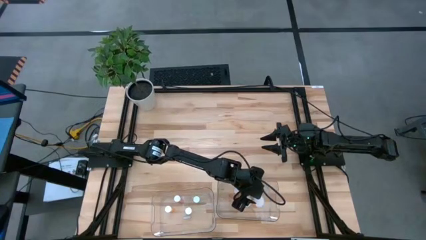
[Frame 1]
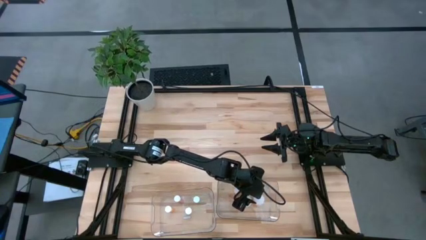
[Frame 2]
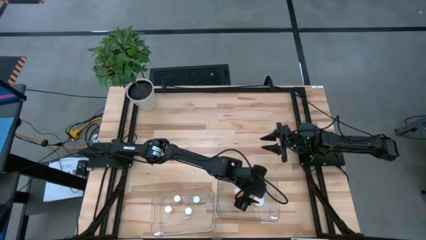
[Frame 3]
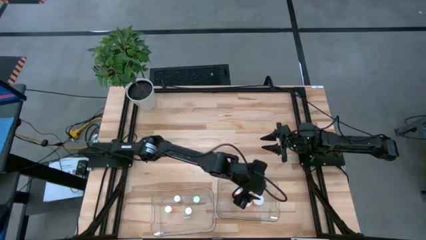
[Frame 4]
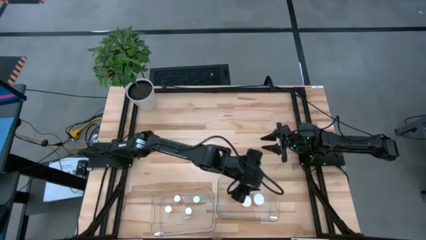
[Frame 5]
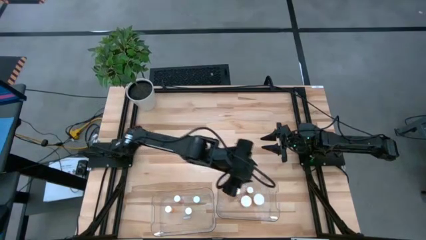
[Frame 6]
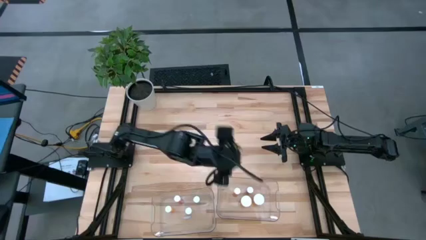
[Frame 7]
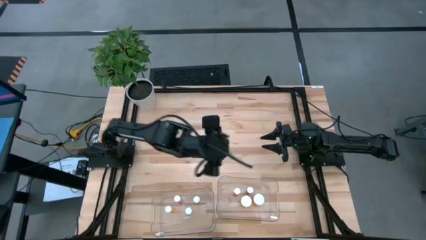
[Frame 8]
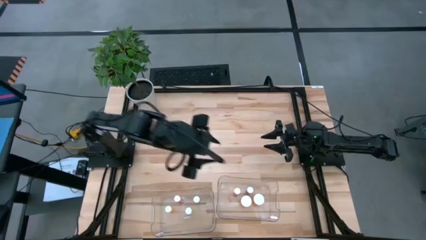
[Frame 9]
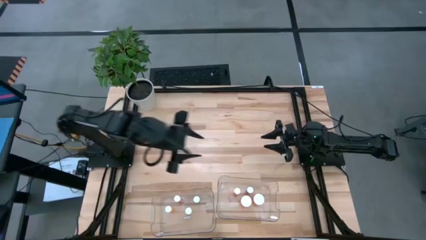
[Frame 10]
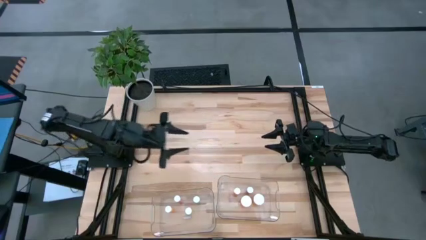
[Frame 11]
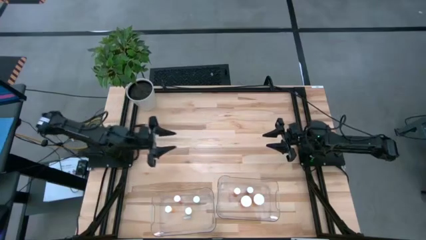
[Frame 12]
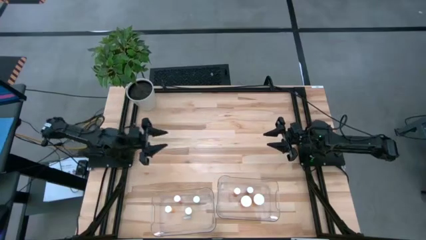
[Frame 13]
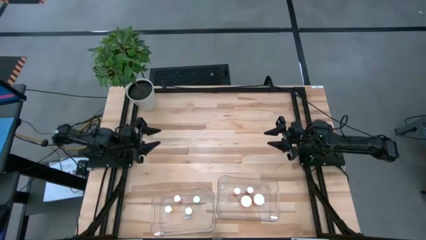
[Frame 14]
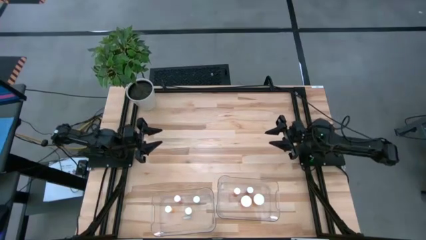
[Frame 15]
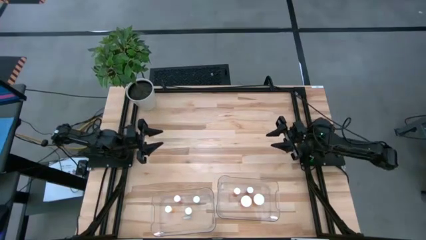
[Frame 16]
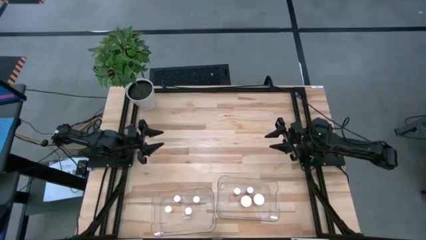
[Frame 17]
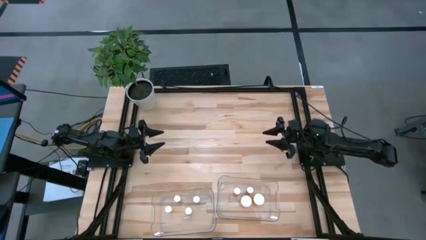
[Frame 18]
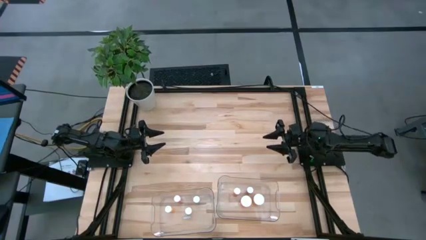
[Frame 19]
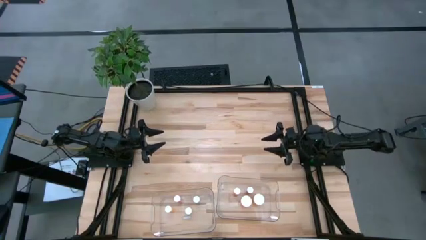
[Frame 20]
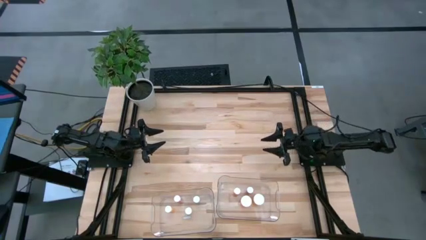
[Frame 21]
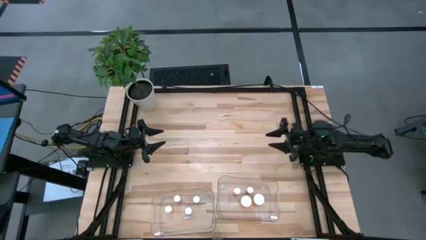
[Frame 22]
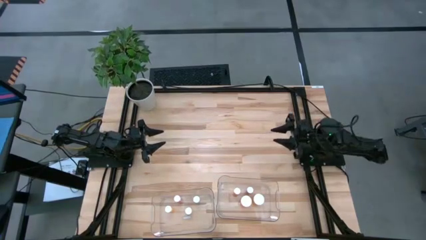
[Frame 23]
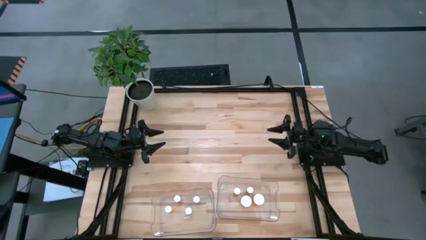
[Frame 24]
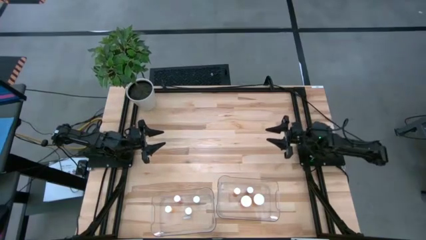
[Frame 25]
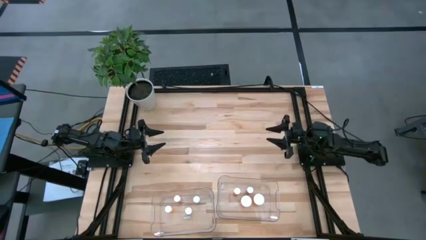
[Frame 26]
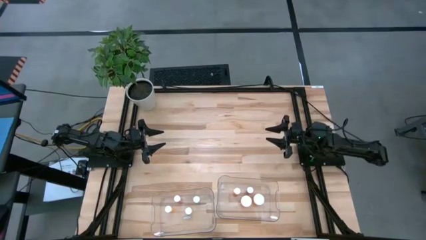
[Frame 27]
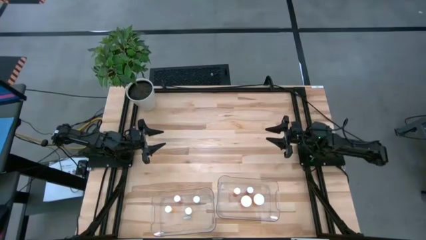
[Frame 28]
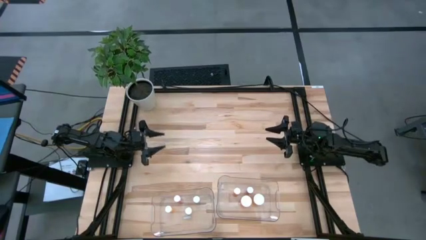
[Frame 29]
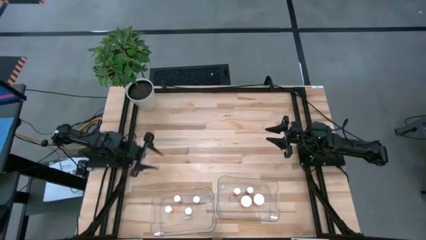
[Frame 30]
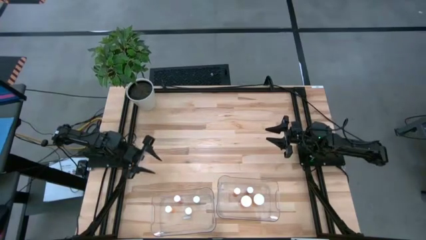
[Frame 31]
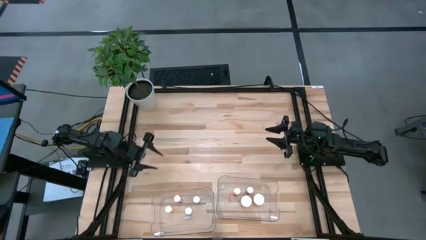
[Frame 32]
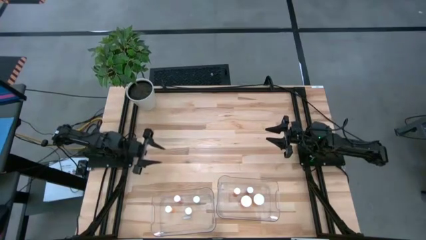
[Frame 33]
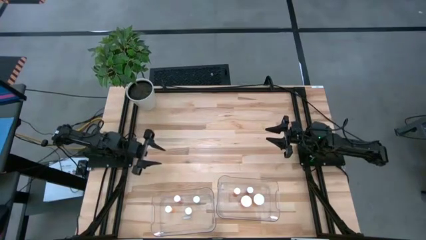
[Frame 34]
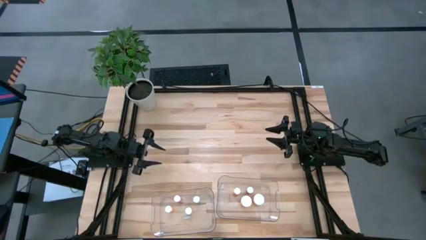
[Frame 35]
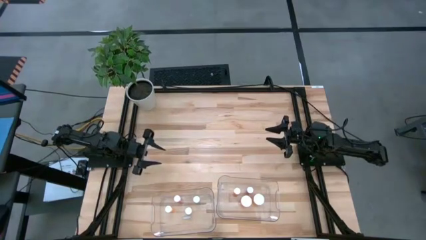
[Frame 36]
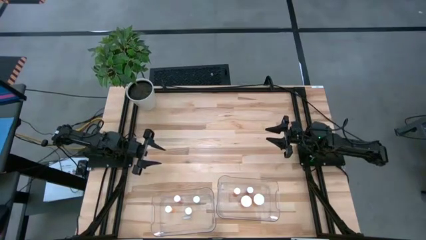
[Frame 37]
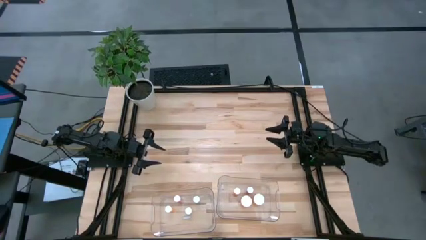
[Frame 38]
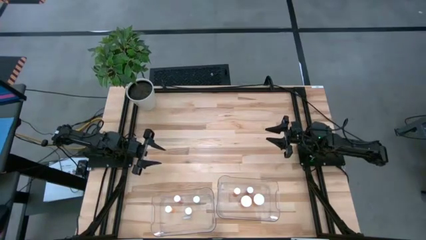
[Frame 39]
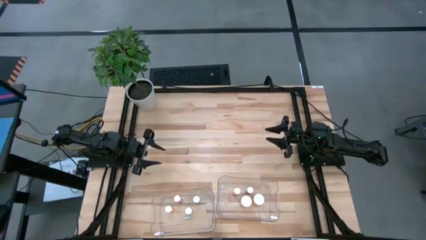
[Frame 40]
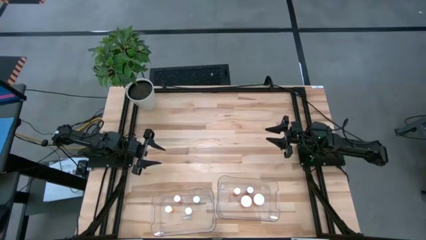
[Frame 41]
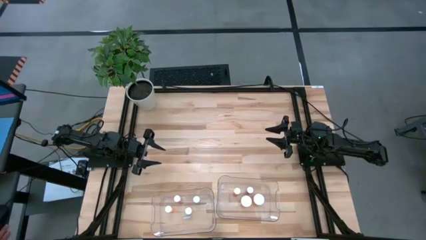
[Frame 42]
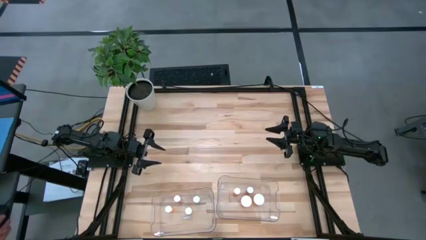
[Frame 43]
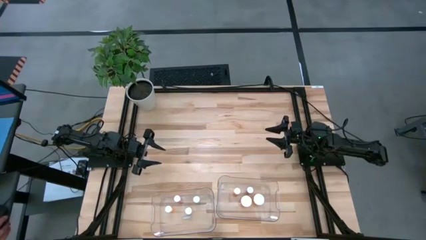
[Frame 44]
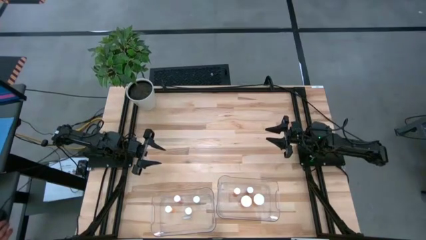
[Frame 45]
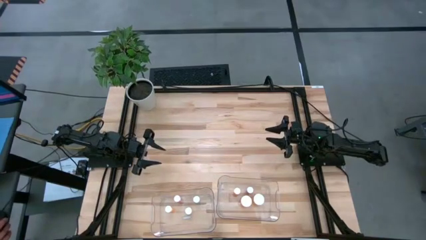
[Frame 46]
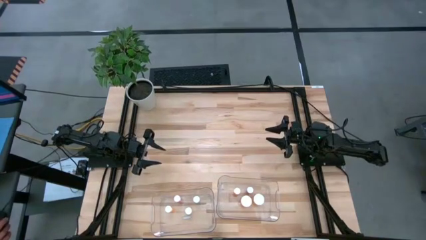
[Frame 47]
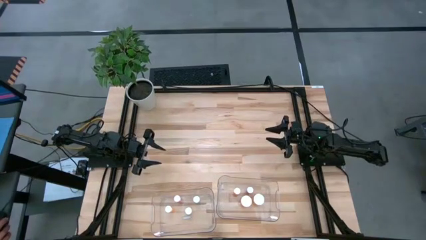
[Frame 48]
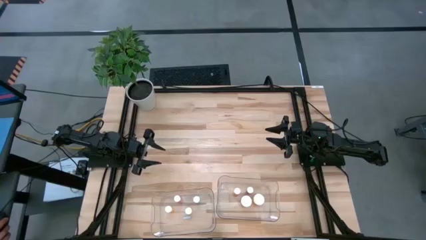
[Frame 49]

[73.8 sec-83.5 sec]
Task: Pick and place medicine bottles into bin by pill shape (circle, oval)
Return to Home Position

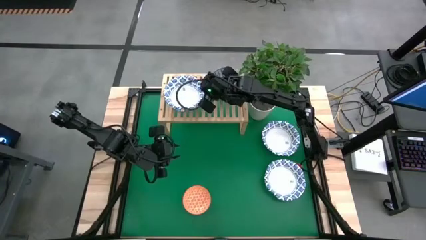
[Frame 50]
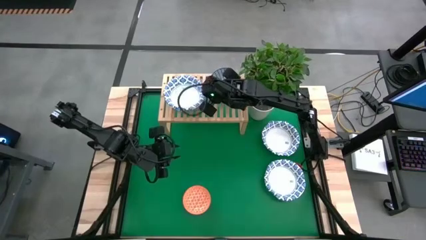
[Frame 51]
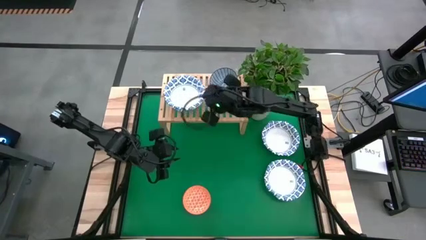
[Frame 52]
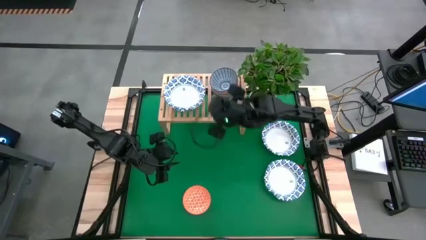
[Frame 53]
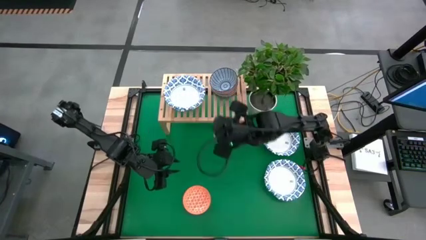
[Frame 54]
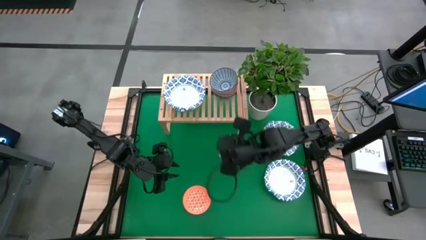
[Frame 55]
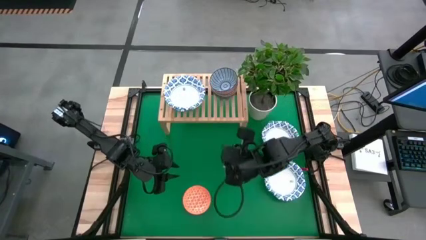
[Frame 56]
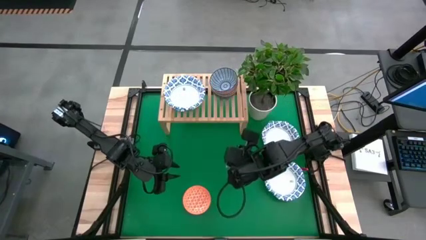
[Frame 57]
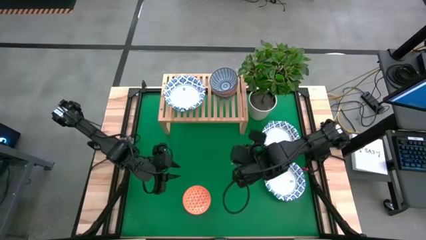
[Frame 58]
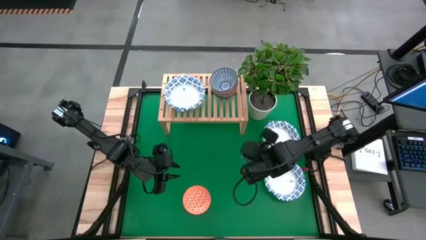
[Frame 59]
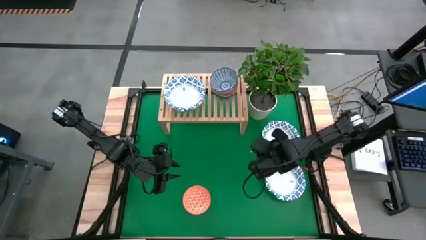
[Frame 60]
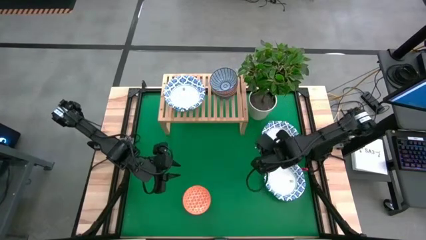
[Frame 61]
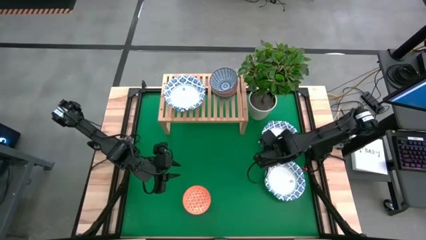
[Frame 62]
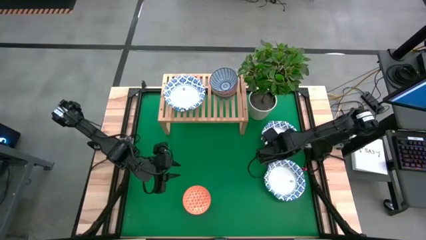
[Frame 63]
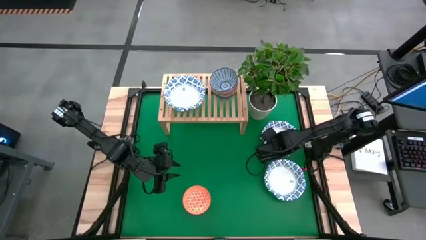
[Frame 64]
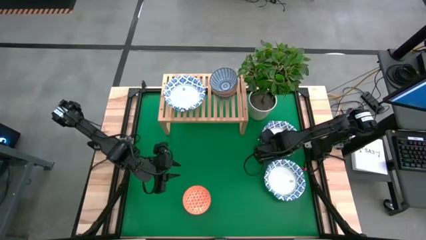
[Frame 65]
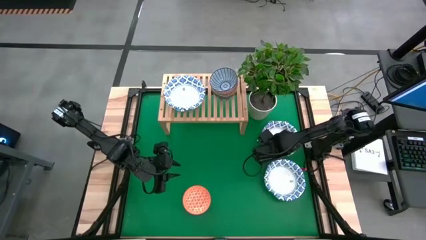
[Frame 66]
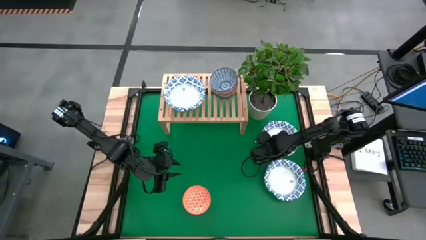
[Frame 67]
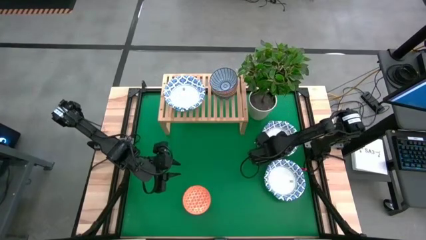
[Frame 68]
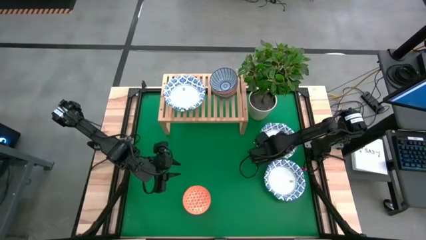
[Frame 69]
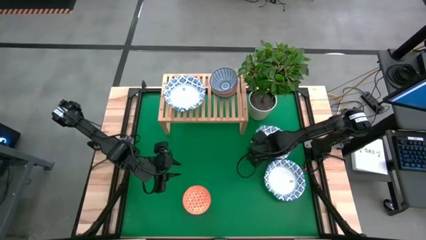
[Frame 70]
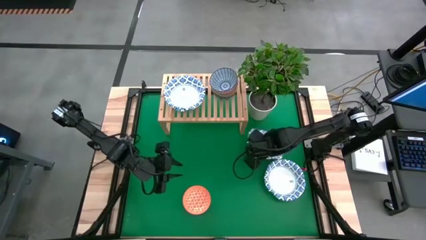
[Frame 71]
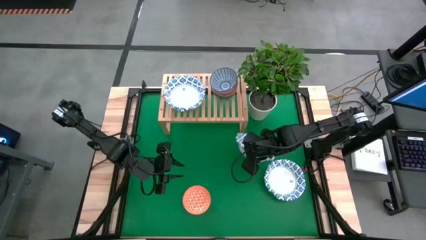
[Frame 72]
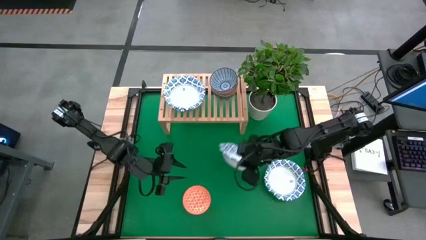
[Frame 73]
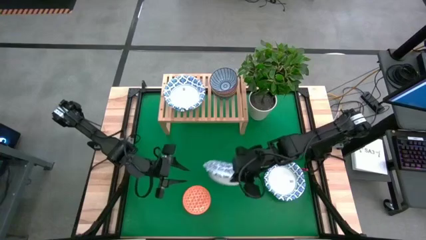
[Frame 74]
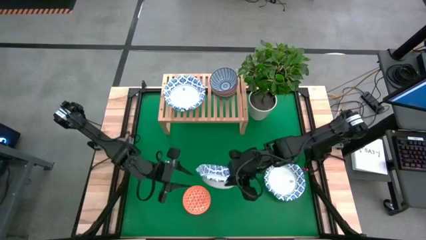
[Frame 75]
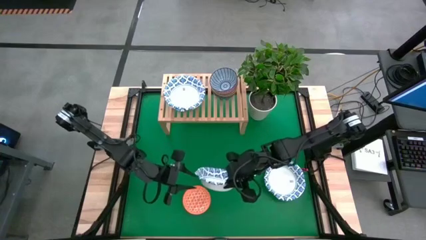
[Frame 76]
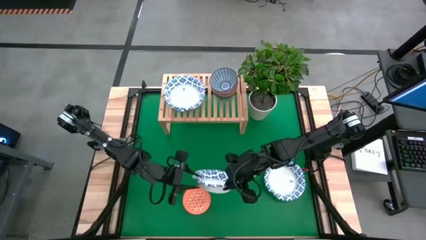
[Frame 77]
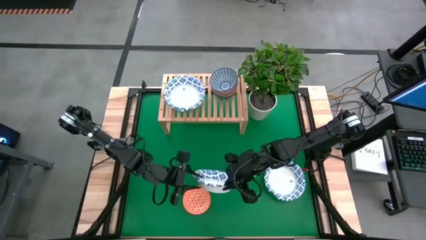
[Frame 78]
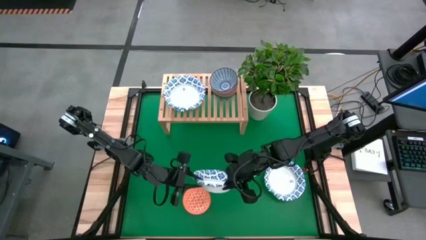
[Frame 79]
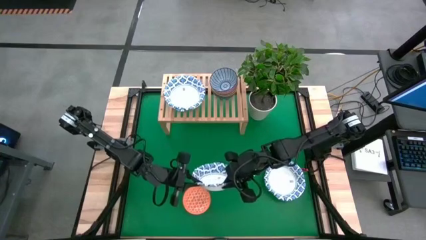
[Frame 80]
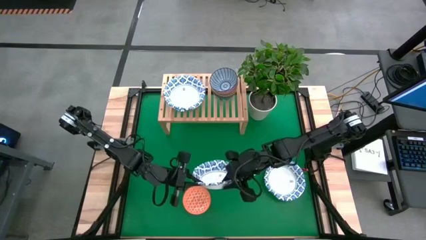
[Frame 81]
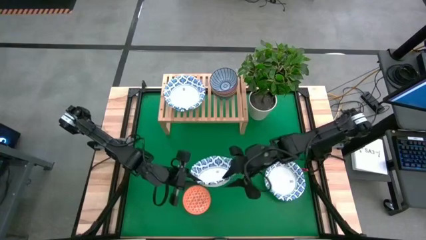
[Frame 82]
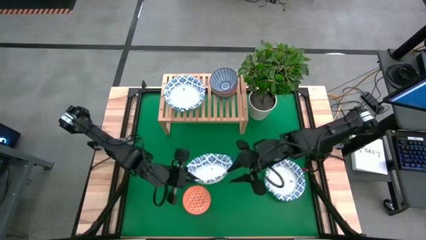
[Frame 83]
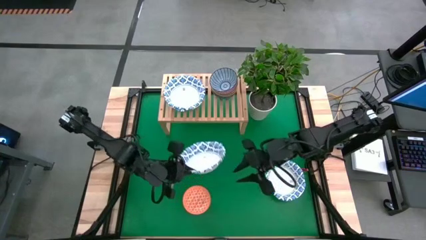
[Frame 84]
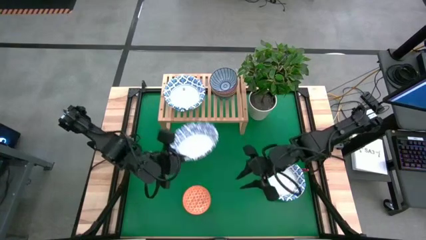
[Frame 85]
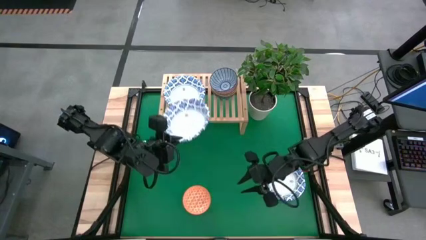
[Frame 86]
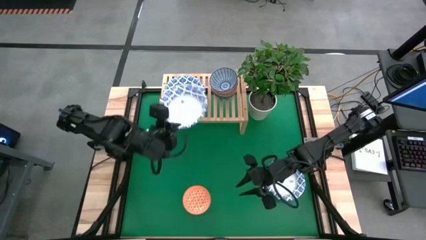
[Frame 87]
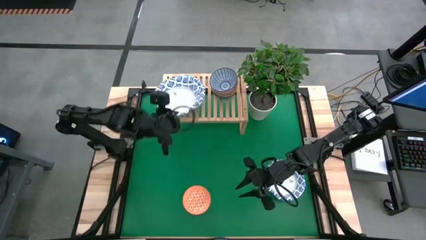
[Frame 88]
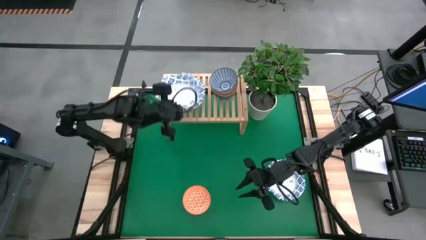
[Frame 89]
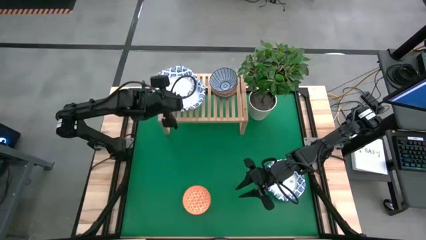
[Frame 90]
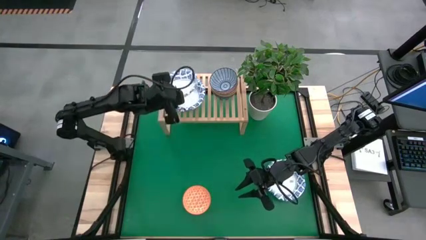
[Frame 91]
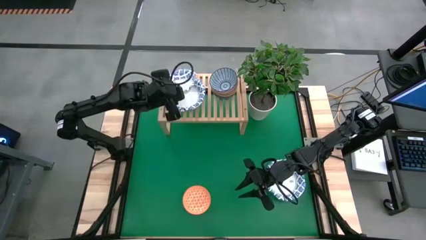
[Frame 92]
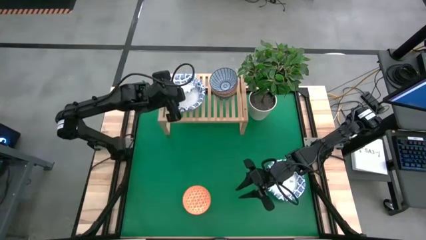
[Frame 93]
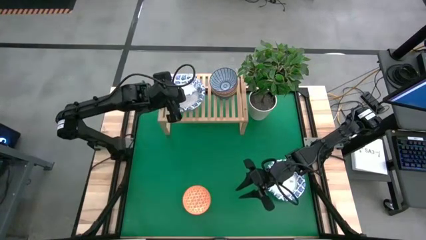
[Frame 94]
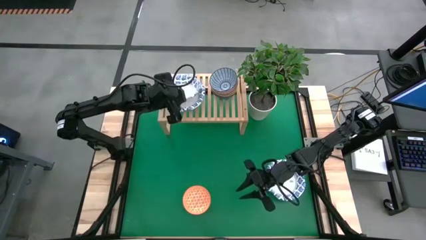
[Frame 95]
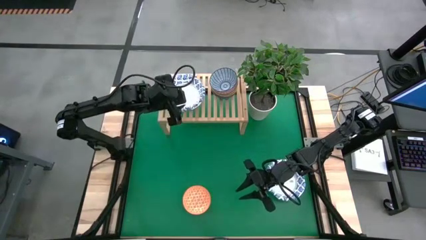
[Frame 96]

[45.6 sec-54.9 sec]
Task: Place and stack bowls onto a shelf
Stack the big white bowl on the big white bowl on the shelf
